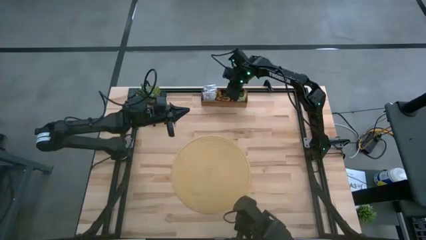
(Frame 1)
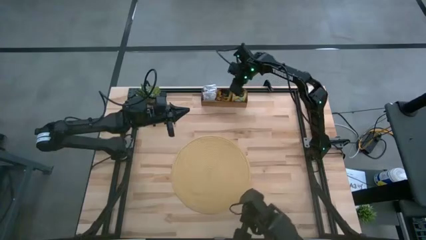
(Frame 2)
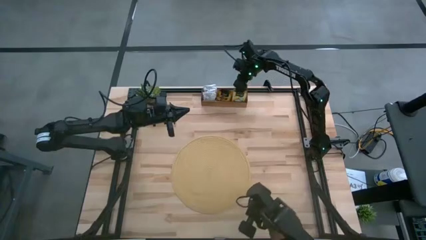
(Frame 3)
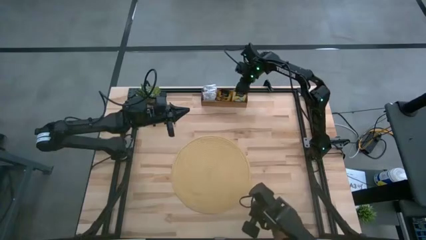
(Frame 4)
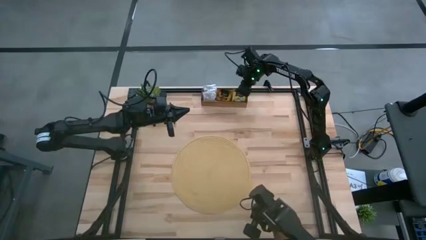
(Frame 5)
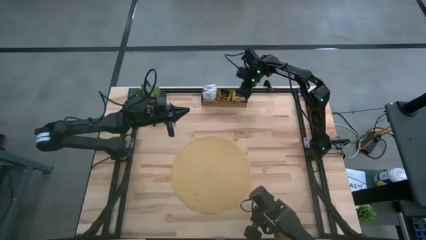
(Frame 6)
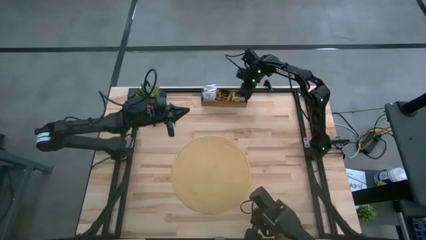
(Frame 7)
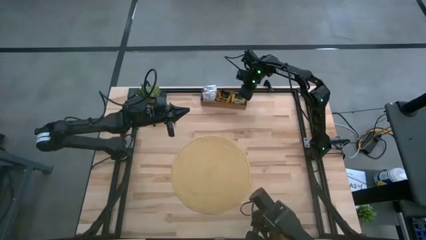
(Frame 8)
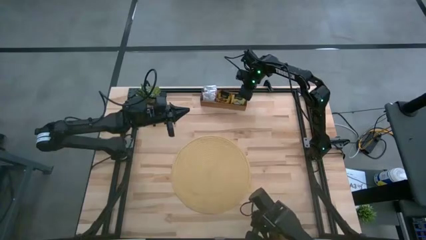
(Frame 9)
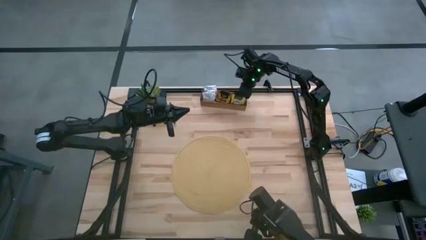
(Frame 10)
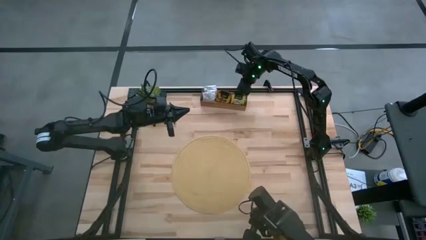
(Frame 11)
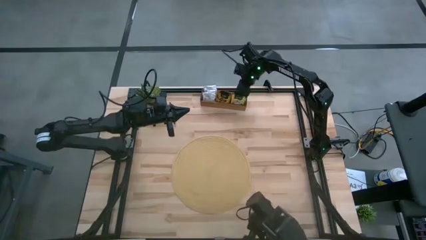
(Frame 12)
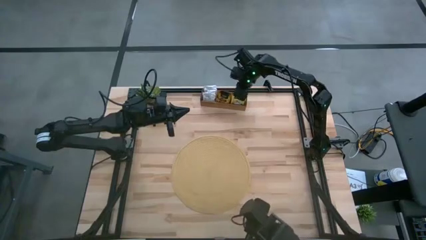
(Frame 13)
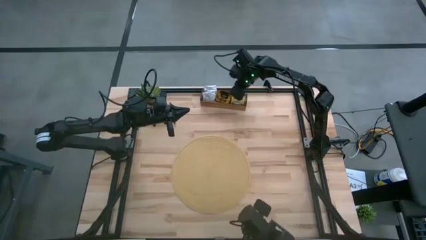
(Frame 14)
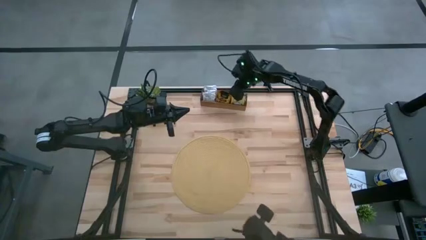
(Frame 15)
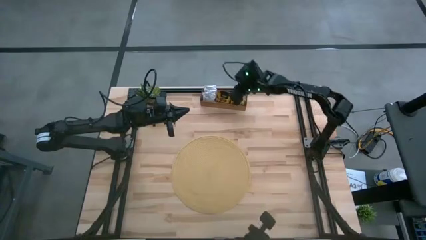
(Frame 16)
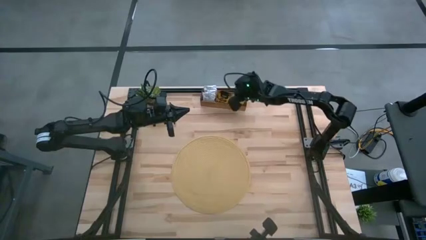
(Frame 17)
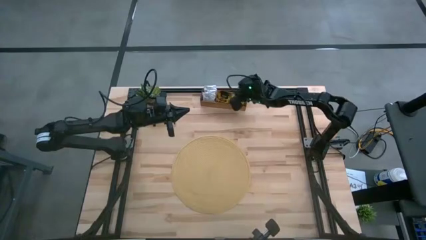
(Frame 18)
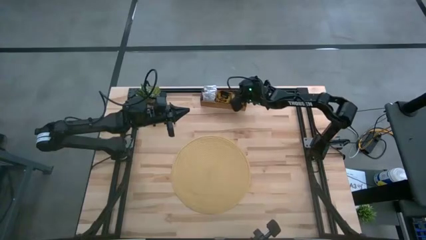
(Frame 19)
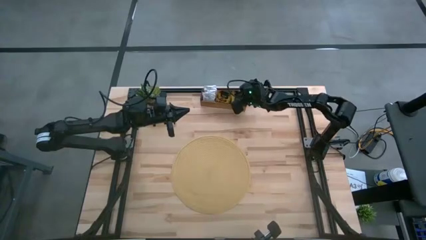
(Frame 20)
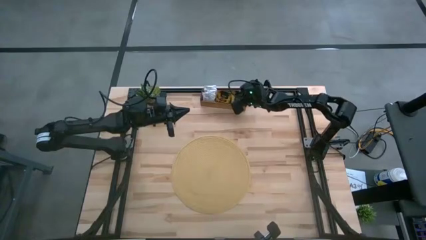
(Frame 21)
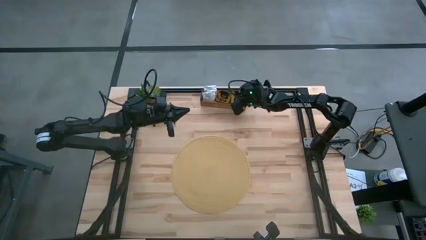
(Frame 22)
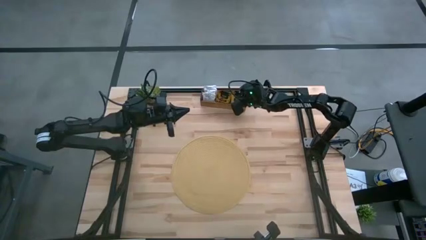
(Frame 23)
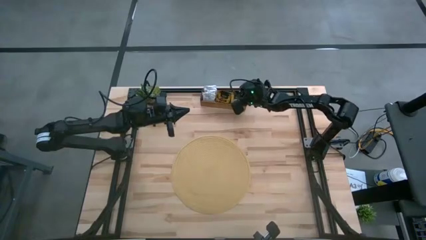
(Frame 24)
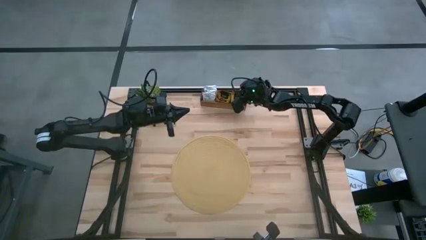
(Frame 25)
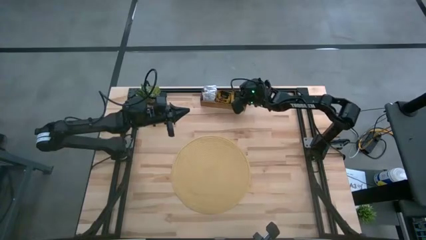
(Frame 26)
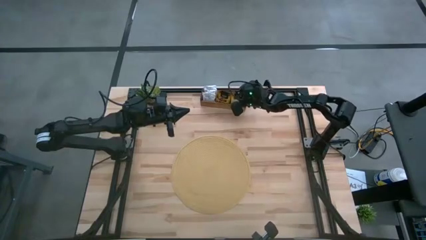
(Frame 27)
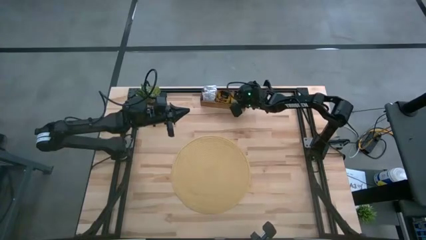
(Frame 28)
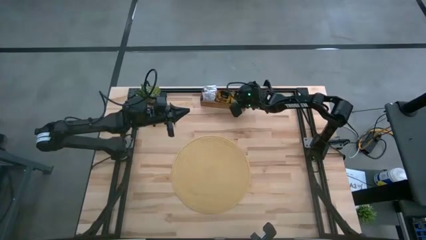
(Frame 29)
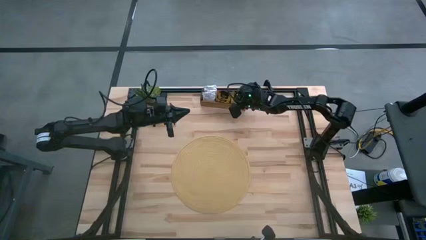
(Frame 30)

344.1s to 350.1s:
Task: Pick & Place Tea
Adjust the yellow tea bags in the right section of the wooden organizer

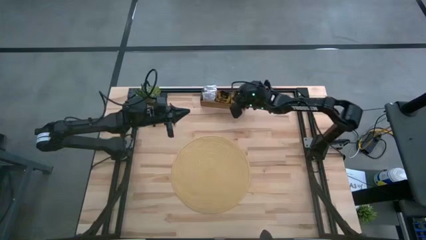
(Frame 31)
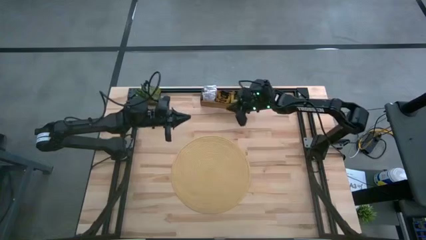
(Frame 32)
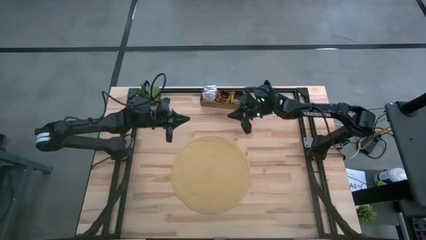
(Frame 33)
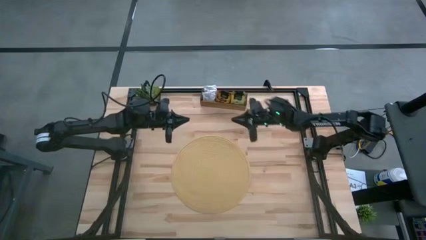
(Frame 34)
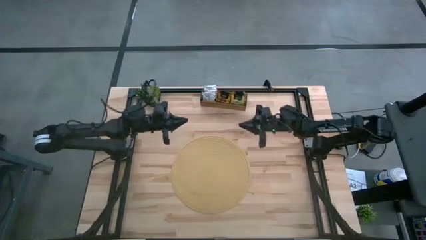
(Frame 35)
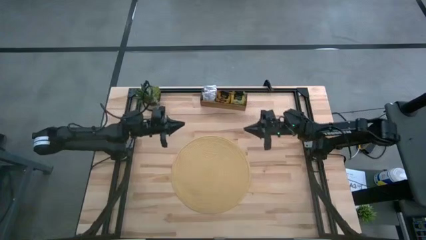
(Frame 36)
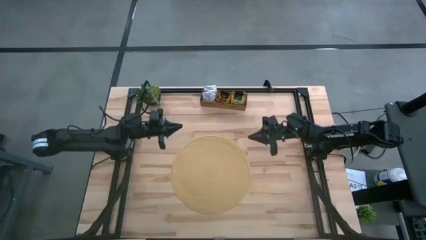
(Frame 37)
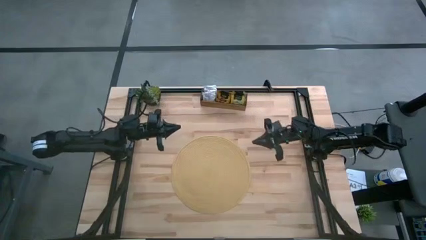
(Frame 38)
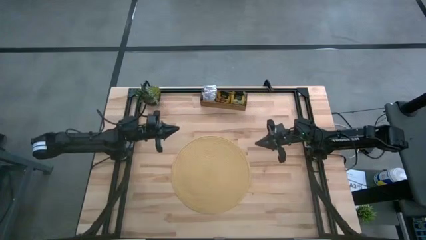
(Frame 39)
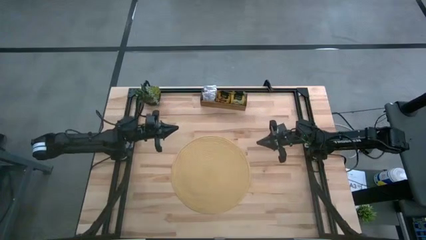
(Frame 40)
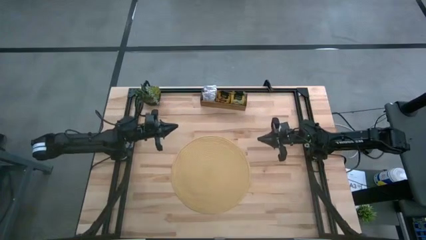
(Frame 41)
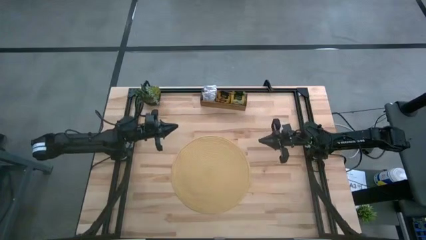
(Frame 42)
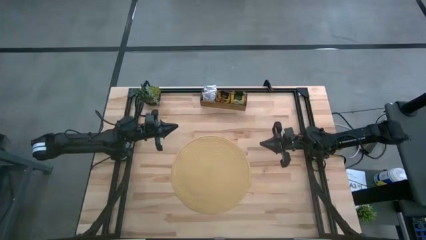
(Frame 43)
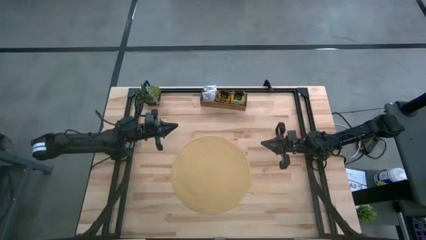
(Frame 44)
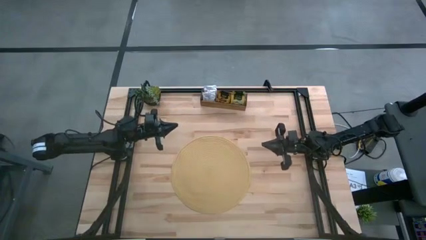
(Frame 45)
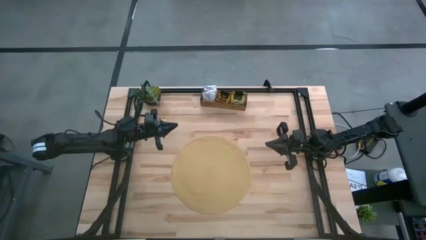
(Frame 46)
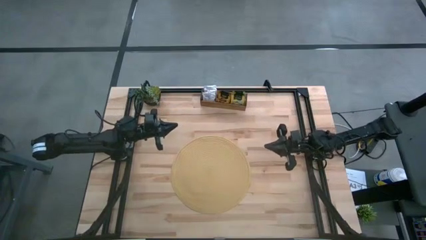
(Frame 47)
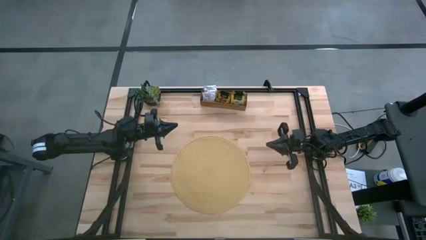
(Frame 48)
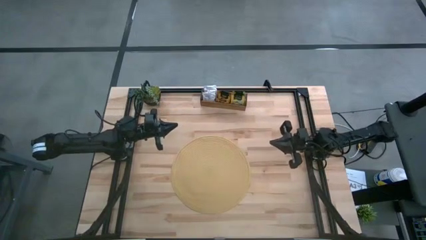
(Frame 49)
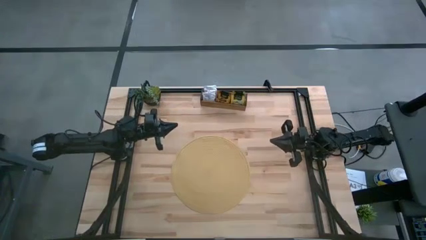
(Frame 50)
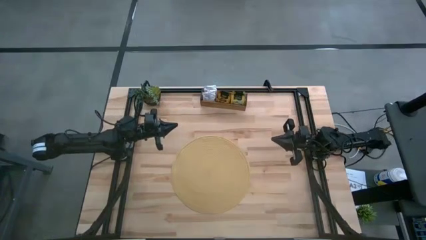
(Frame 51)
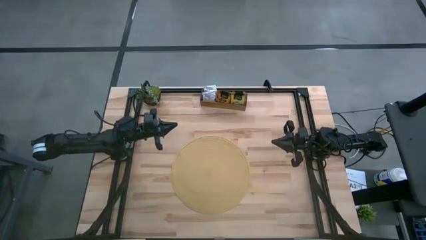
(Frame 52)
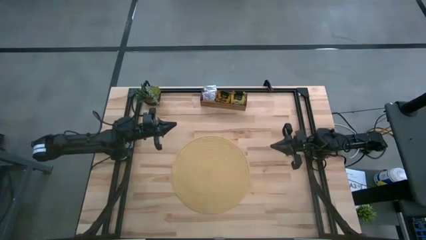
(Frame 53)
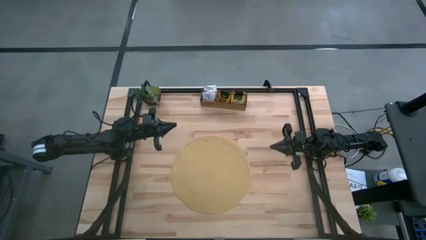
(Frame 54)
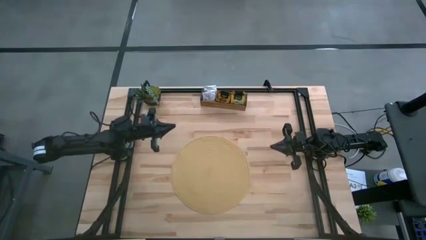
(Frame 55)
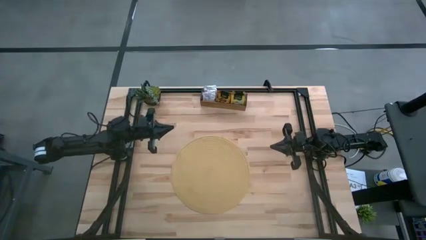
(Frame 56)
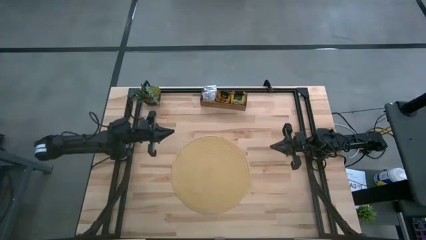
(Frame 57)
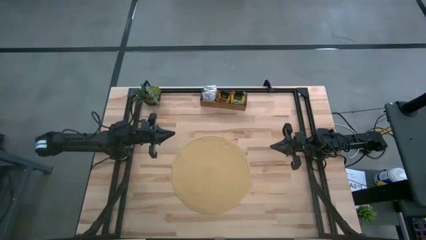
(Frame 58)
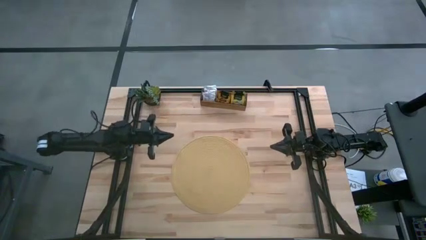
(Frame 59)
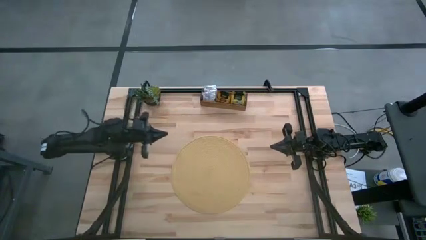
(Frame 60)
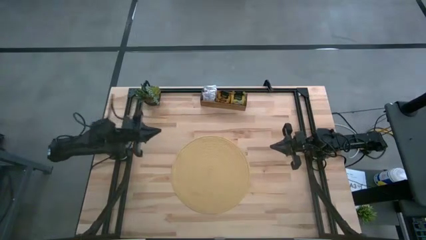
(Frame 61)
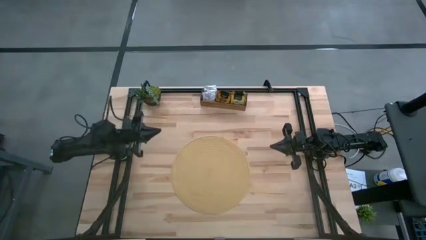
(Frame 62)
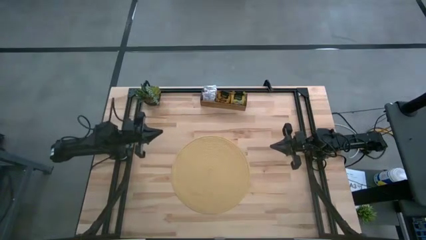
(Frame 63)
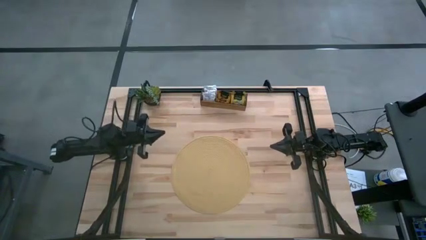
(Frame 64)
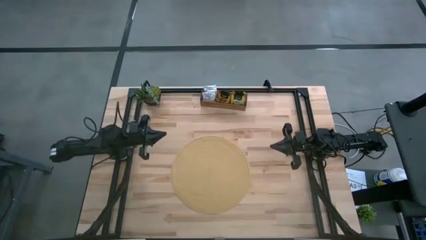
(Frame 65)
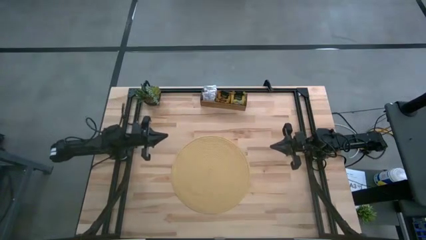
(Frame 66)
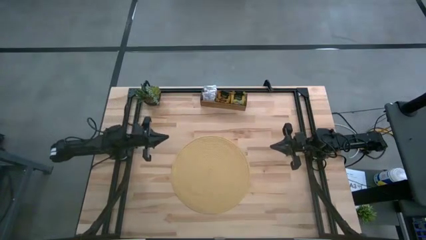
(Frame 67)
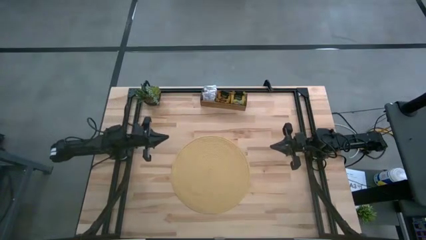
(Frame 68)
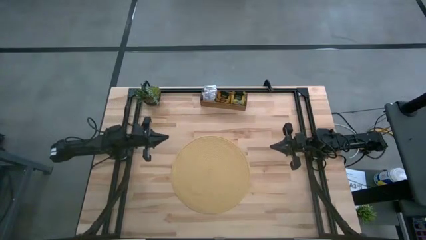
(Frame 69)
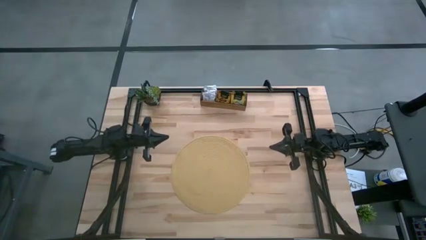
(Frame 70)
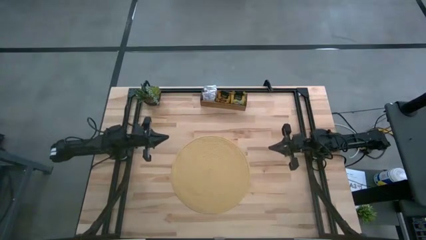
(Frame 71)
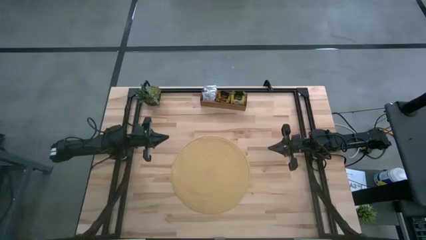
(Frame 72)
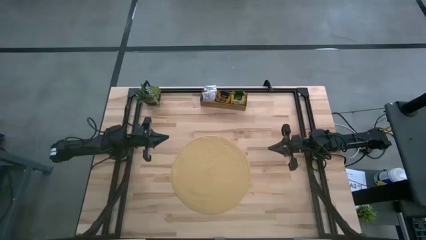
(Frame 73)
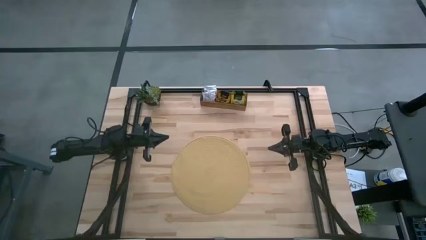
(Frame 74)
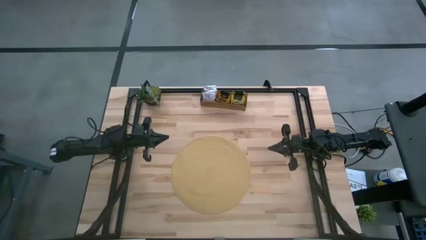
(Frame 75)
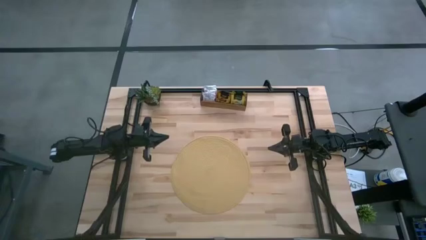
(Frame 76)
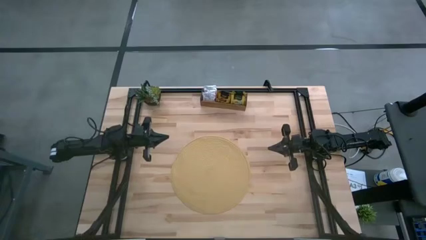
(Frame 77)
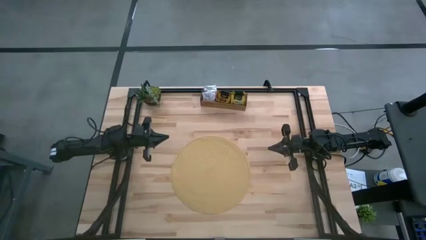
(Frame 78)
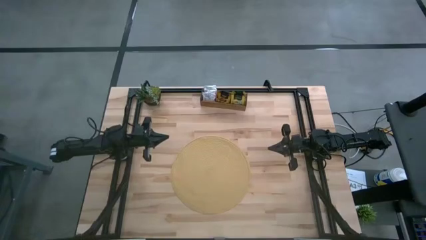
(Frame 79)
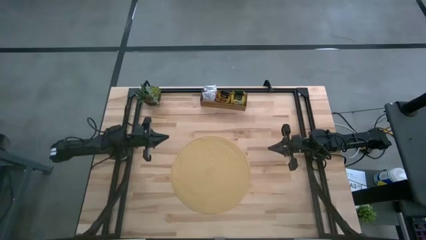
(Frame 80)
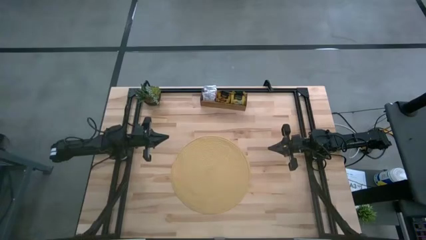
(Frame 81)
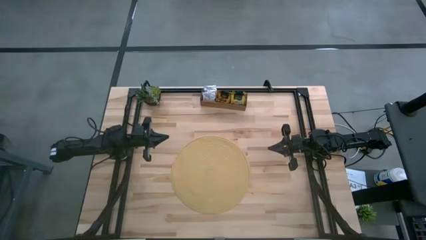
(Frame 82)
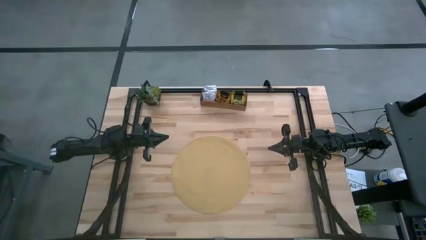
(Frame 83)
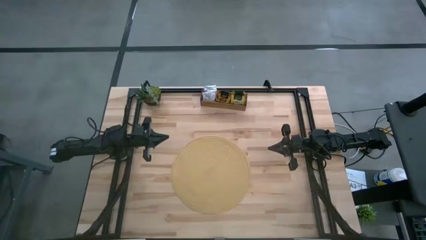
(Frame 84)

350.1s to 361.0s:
Return to Home Position
